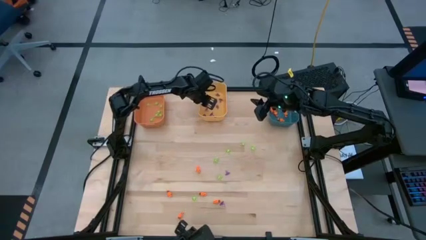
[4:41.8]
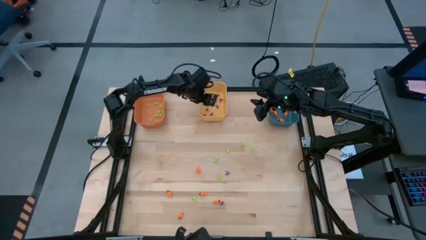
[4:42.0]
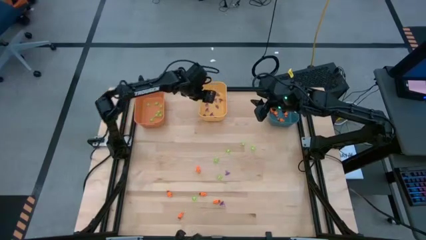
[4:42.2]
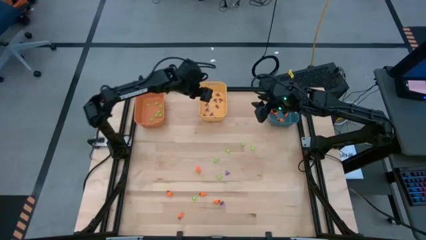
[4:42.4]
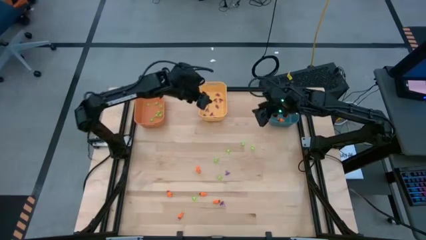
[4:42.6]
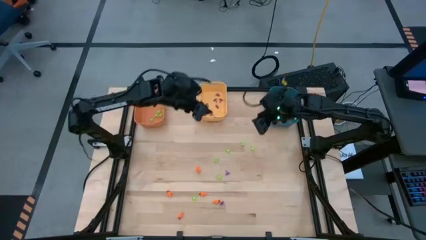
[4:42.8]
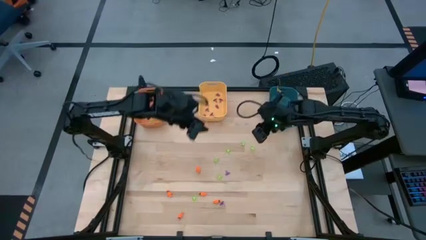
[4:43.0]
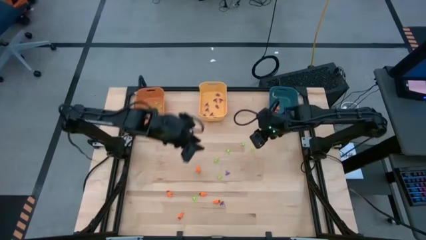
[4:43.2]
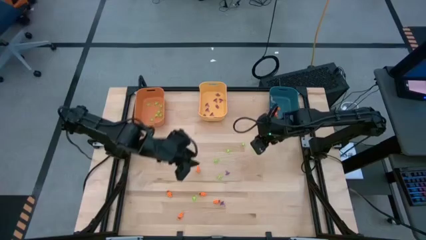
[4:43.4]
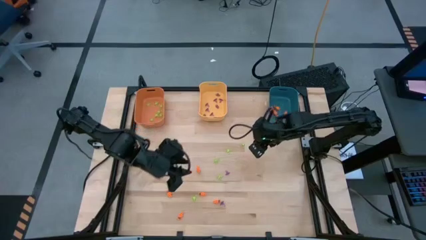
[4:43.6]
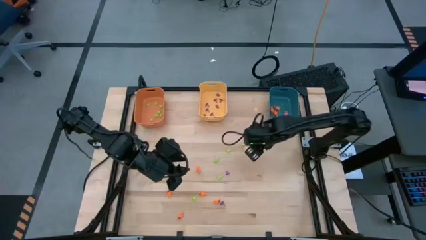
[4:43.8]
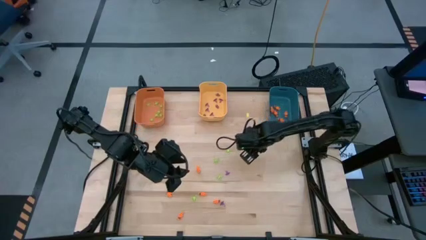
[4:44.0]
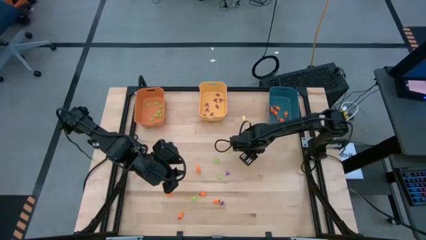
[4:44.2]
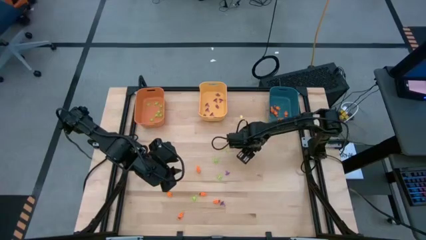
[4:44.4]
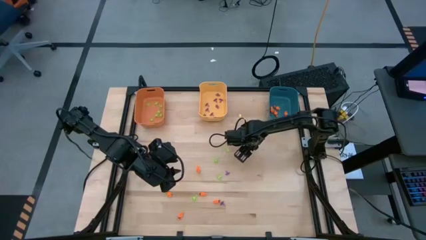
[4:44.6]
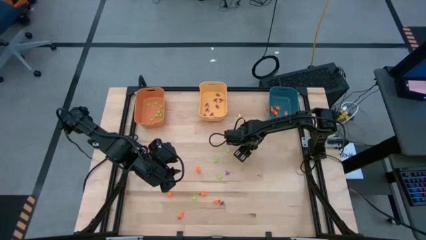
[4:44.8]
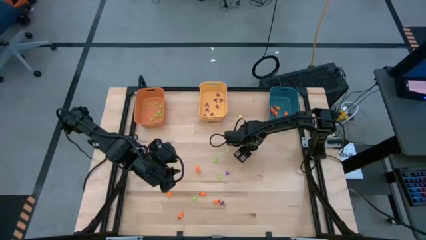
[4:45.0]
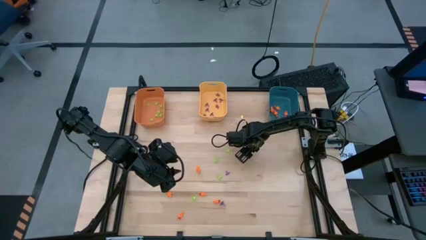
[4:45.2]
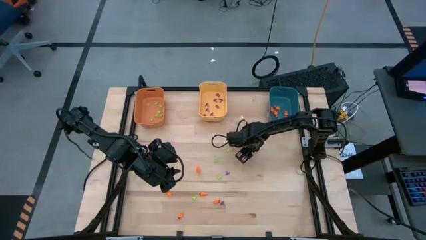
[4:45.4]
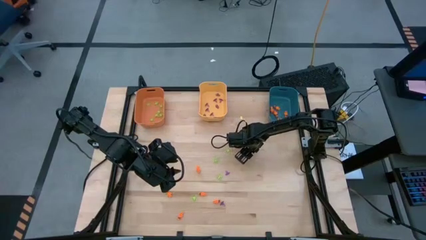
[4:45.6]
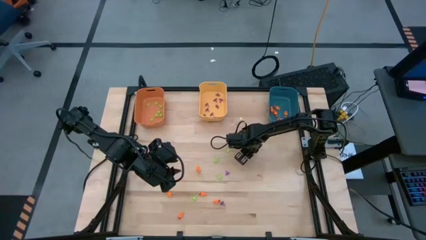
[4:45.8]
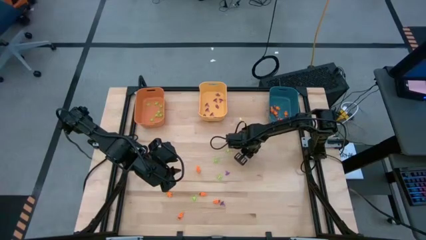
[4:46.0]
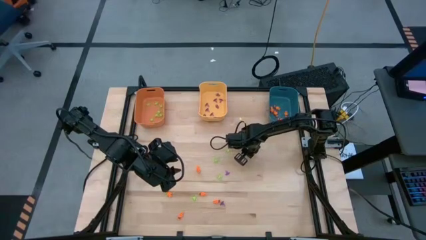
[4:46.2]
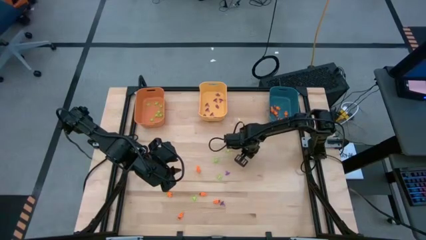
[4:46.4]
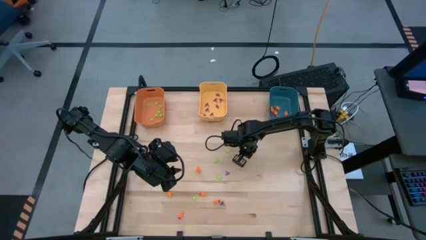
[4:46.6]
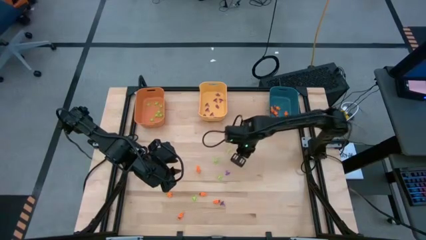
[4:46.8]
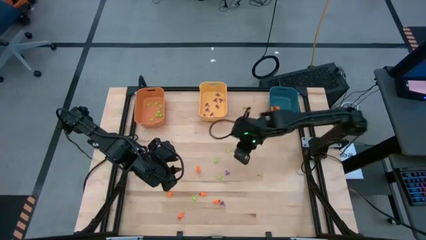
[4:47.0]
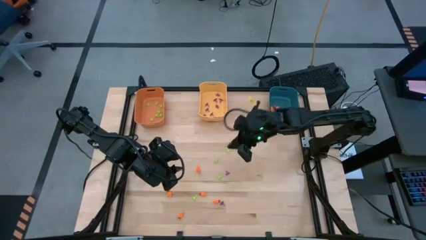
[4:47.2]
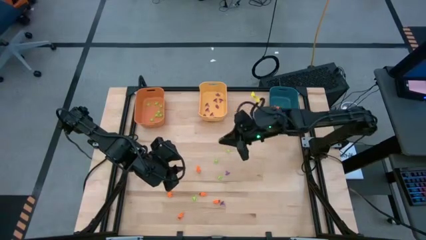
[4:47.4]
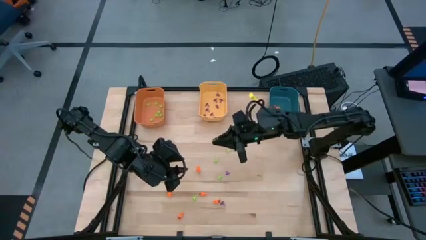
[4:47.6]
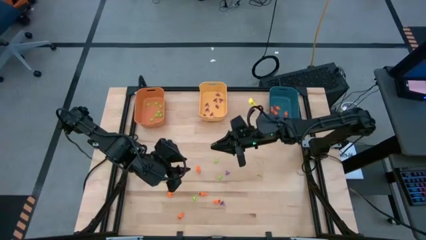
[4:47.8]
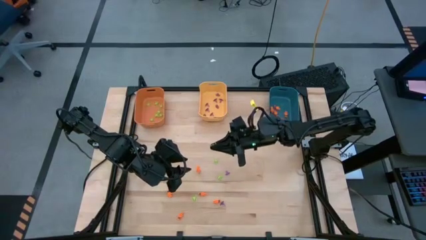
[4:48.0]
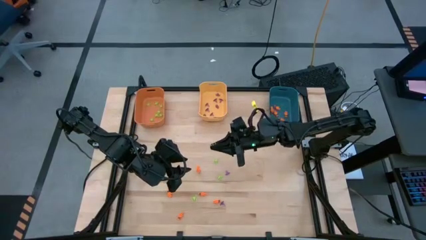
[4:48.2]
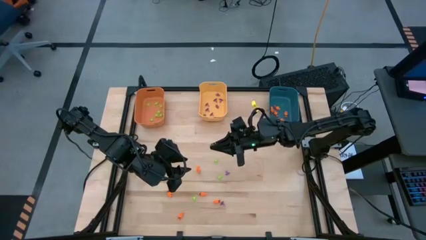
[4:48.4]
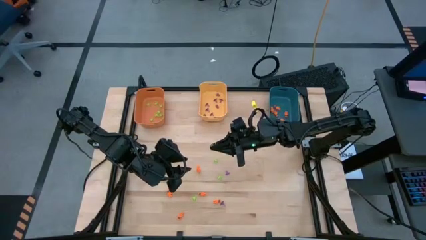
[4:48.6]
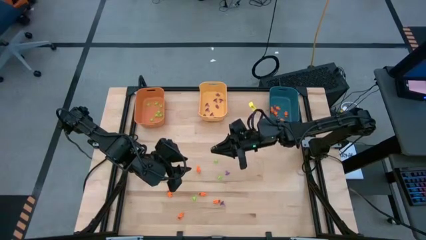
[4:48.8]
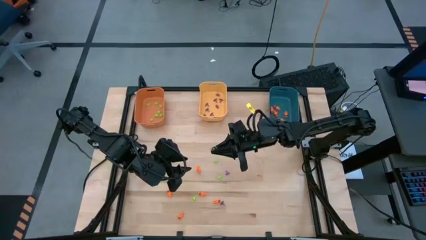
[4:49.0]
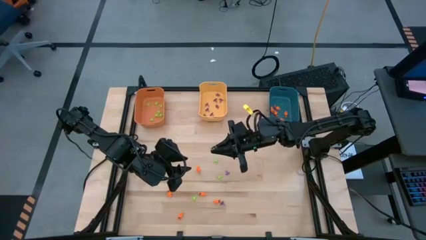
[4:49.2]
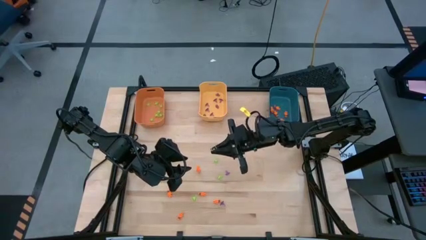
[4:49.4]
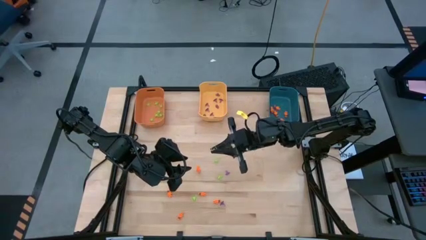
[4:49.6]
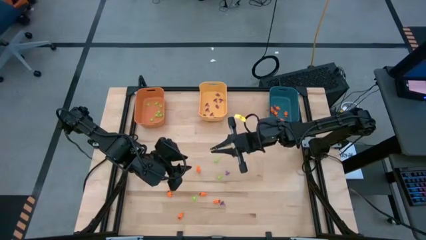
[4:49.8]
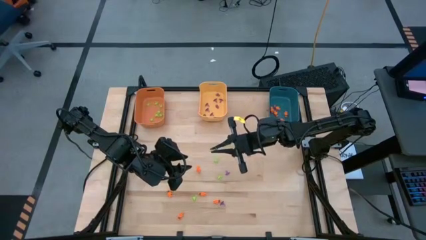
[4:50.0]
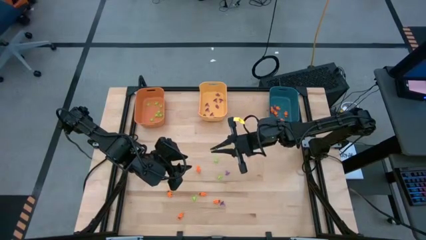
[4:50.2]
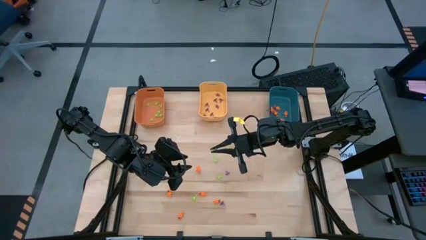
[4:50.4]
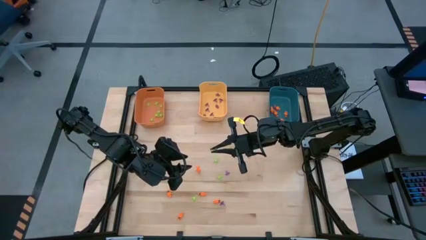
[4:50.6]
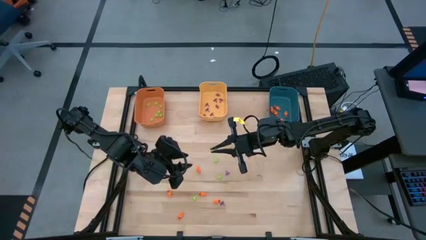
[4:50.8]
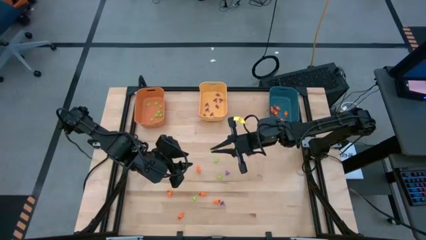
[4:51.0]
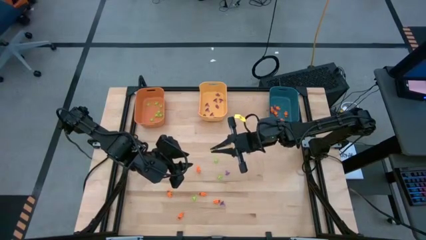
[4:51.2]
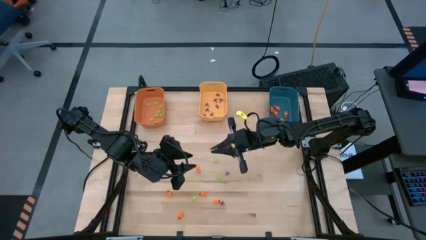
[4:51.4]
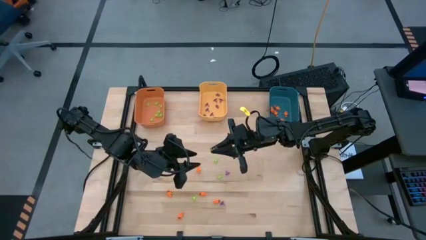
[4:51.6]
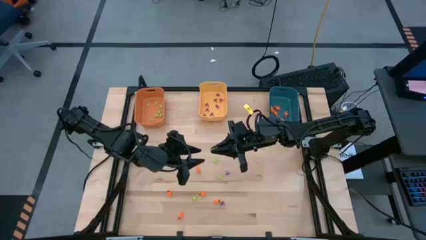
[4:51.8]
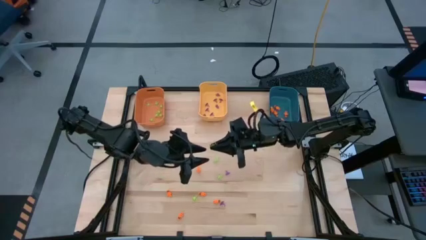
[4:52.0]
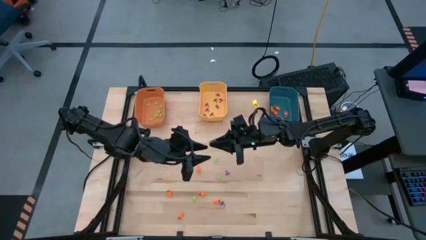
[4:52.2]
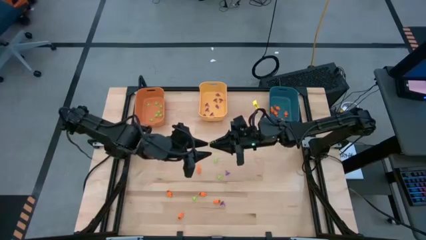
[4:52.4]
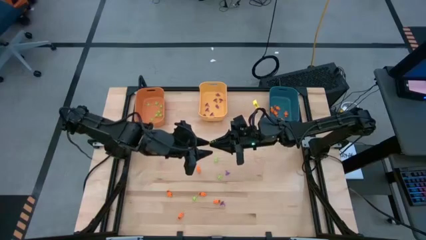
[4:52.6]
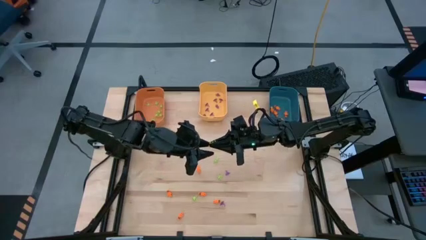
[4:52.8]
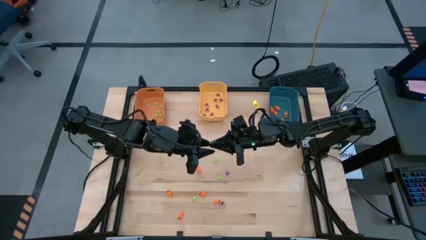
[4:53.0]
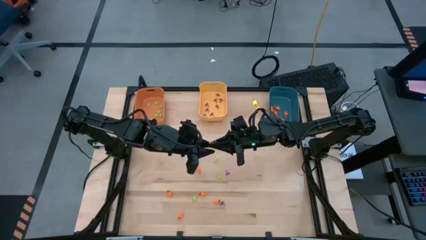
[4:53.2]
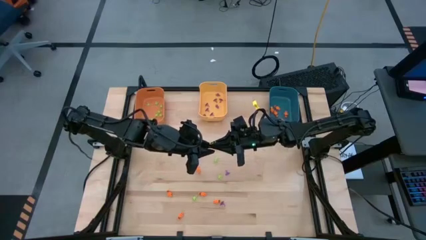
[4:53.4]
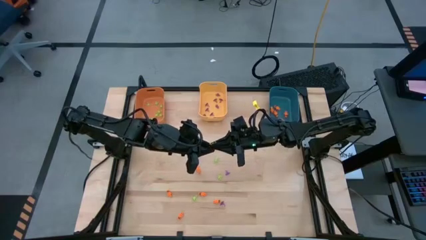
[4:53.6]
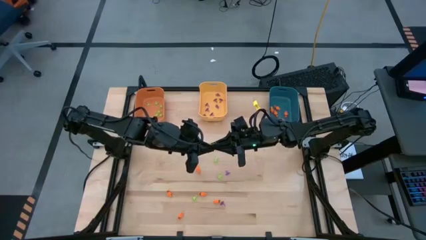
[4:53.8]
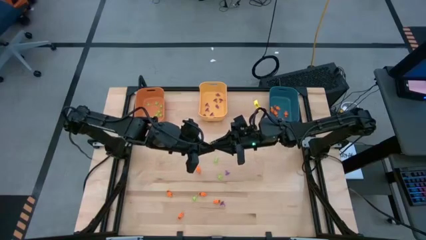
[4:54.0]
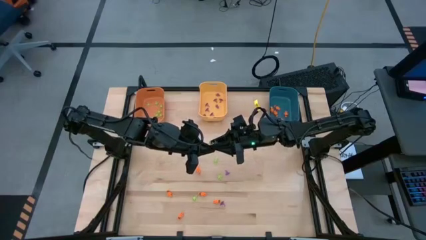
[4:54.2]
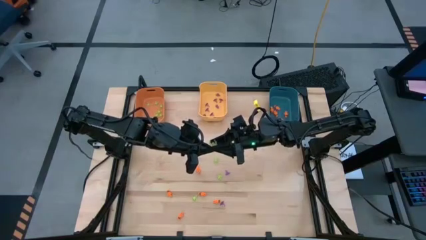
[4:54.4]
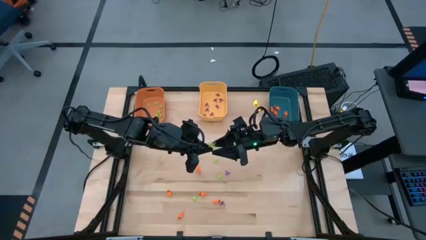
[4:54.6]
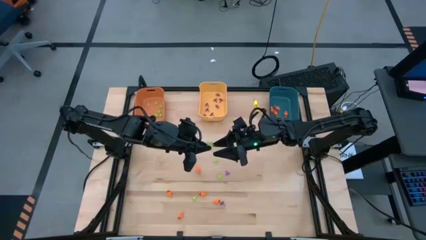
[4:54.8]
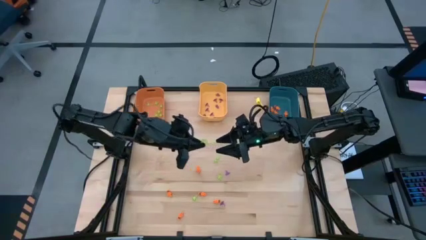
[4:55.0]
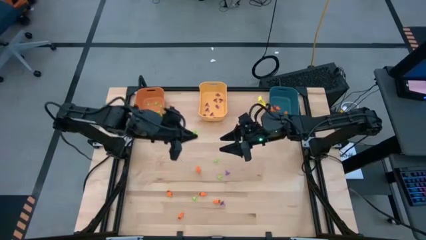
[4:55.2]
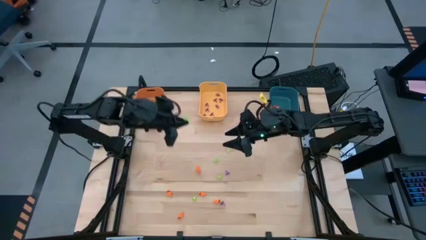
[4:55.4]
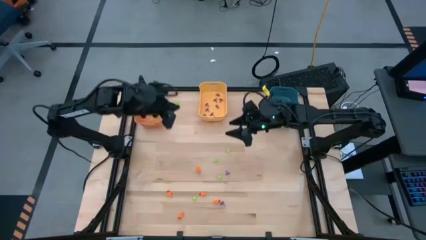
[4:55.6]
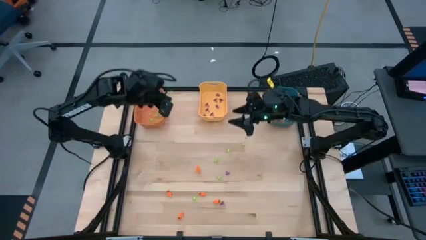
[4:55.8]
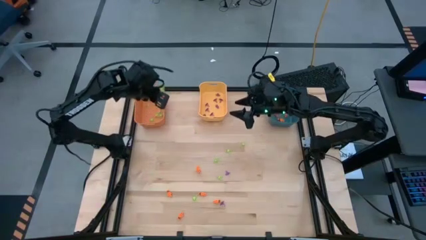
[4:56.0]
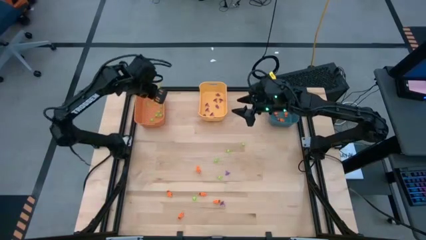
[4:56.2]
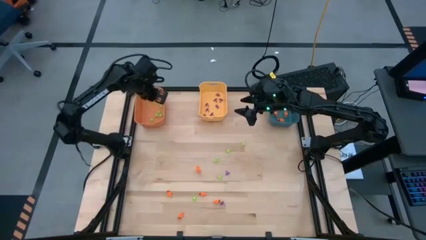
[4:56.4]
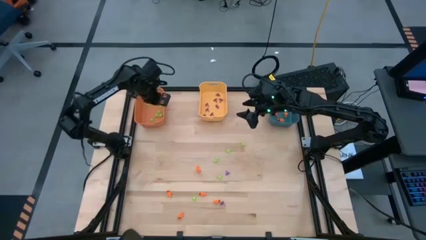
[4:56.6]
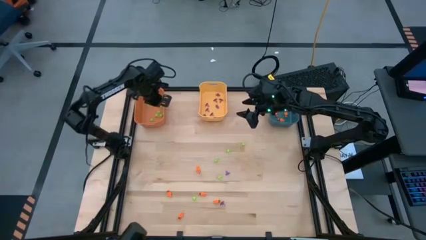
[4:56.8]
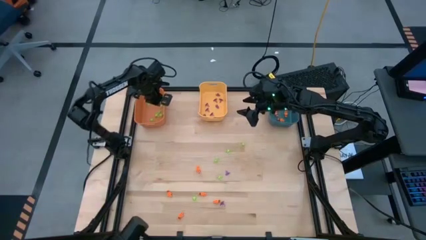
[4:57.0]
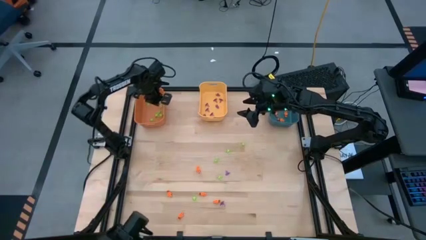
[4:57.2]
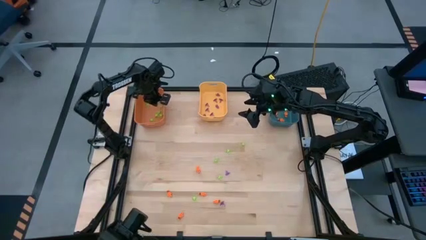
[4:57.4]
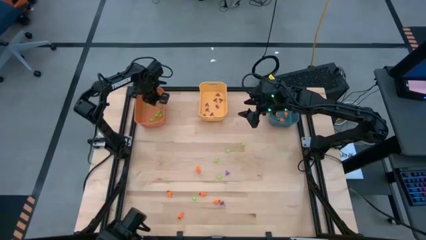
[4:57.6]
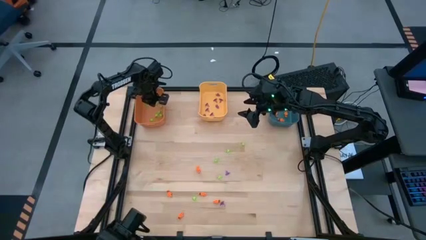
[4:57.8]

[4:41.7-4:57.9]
Task: Sort Halloween decoration
Put the green spider toy into the orange bin
